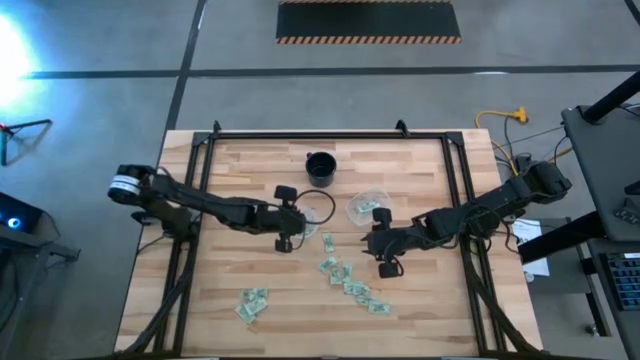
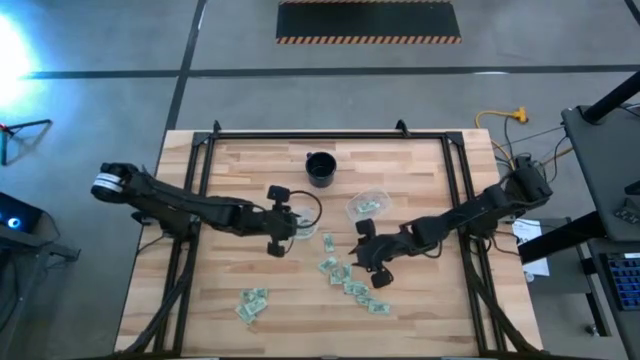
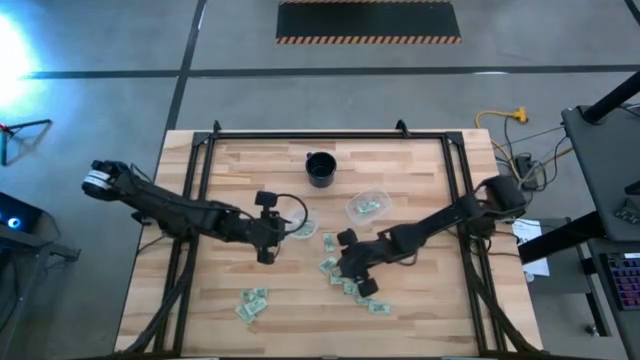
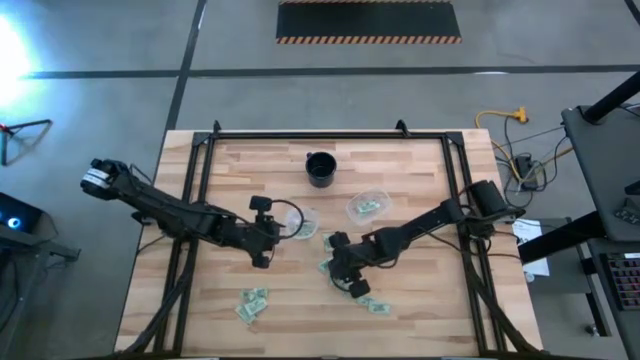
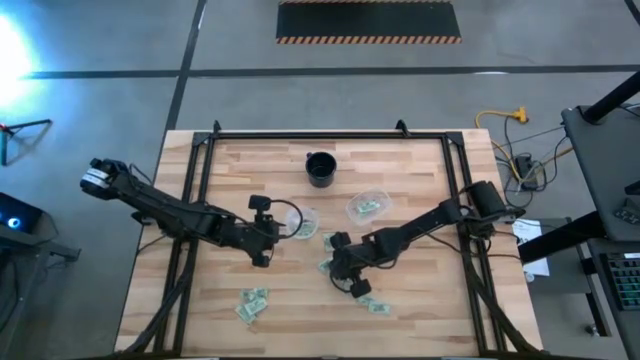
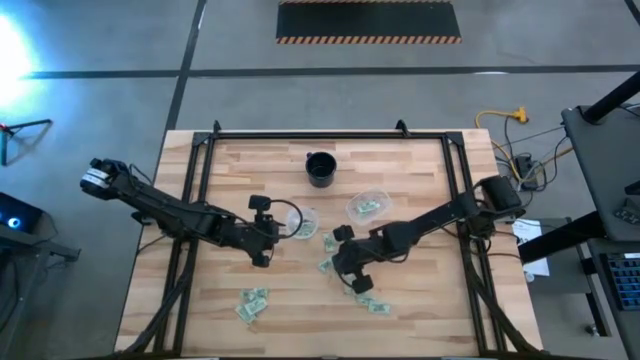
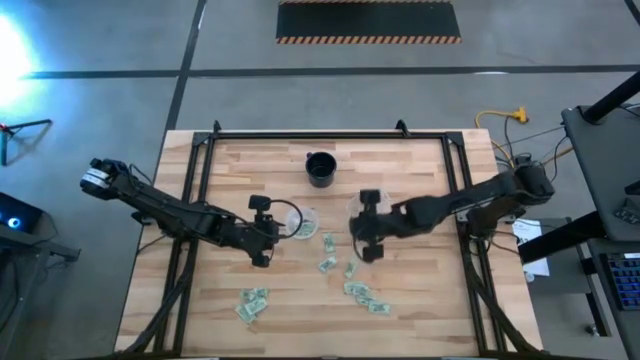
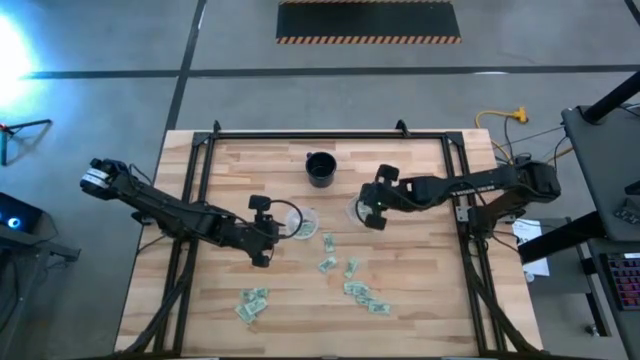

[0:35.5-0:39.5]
Task: Pick and place Stevia / Truvia into bins
Put the green stevia packet into the right transparent container

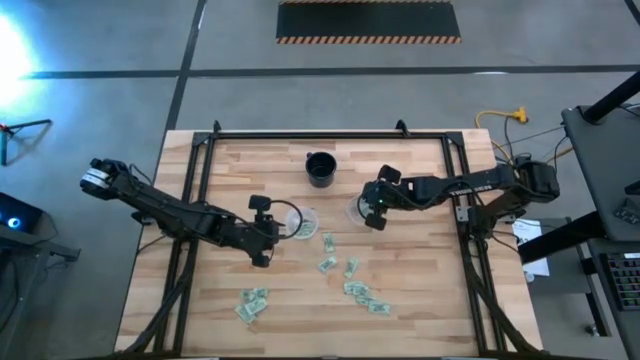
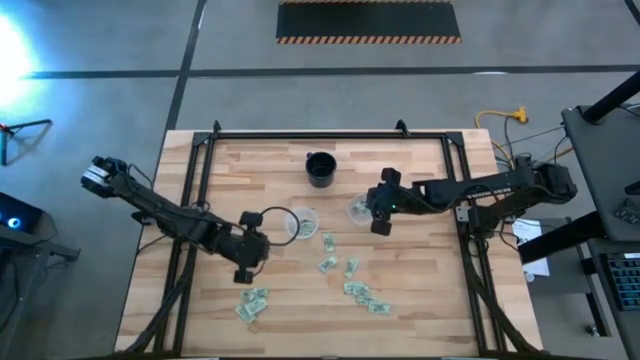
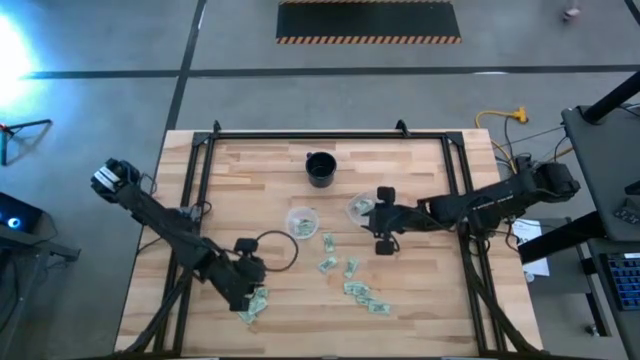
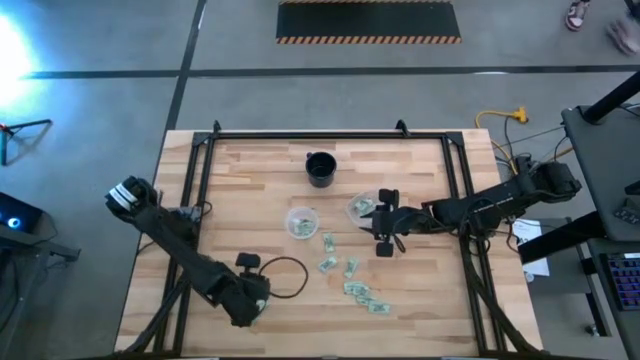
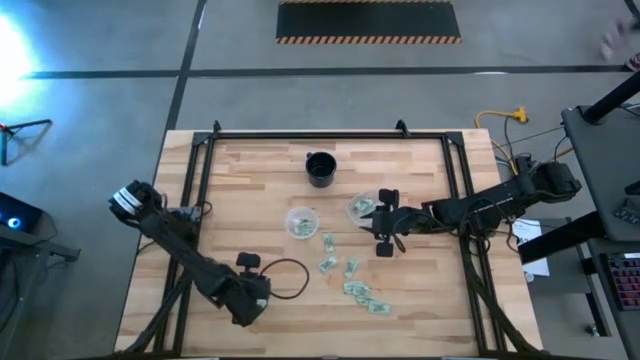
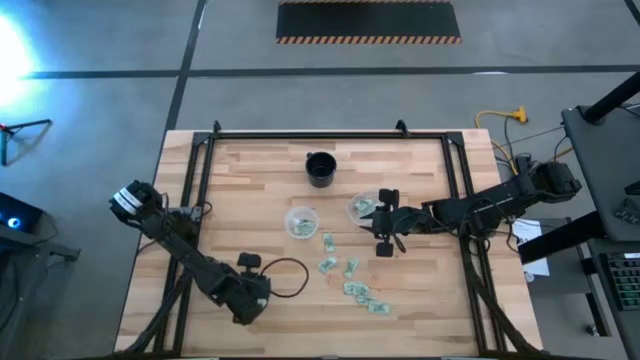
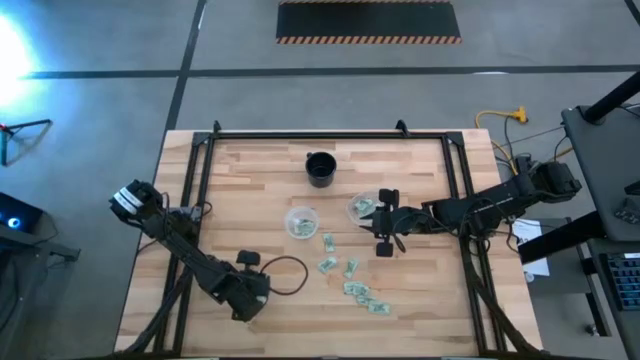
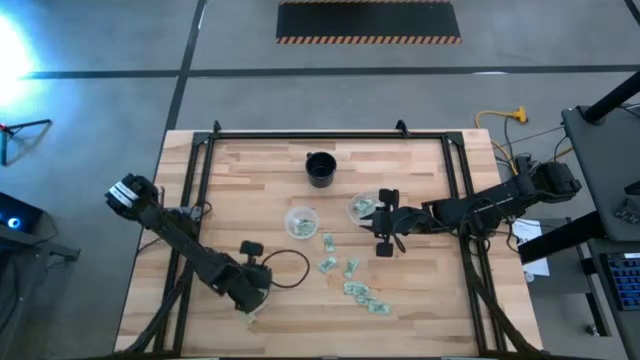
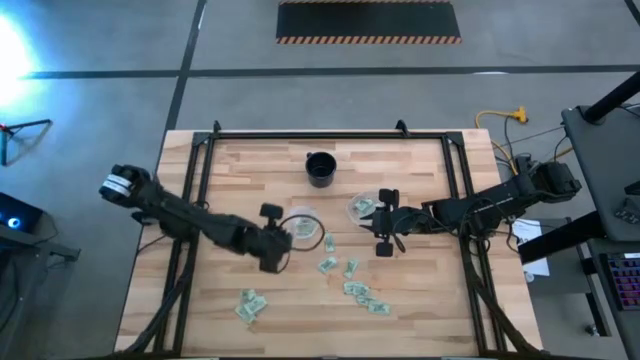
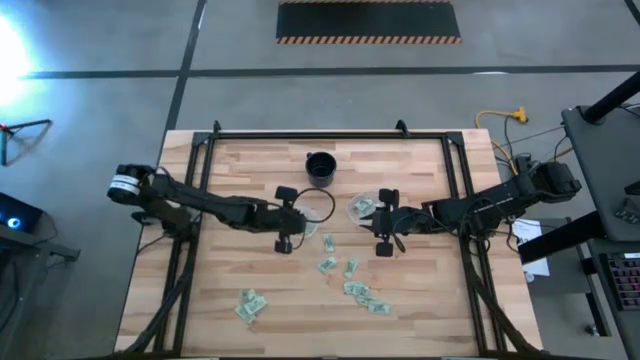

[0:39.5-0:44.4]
Put the green stevia packet into the left transparent container

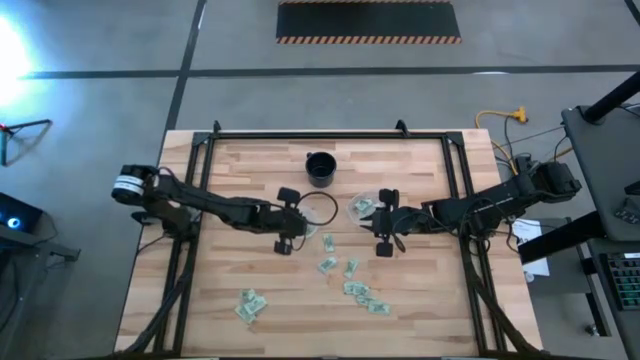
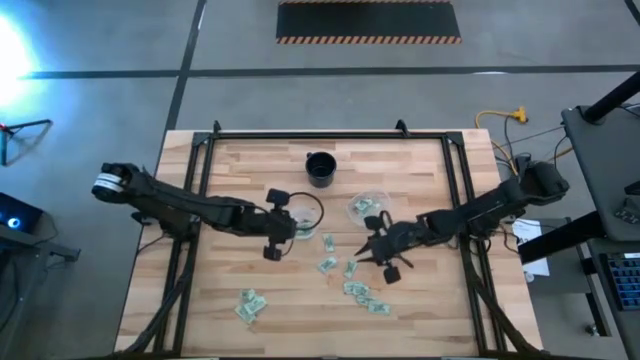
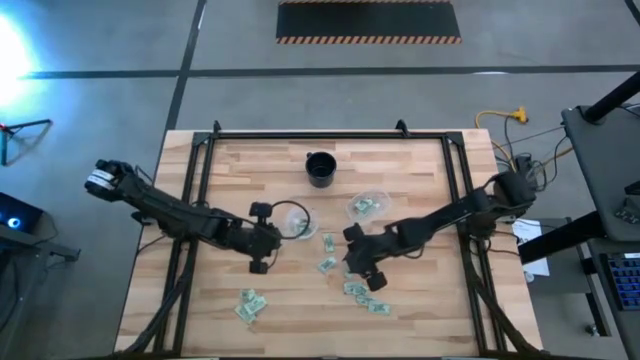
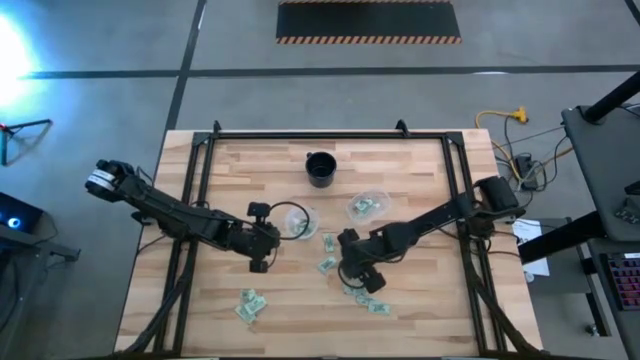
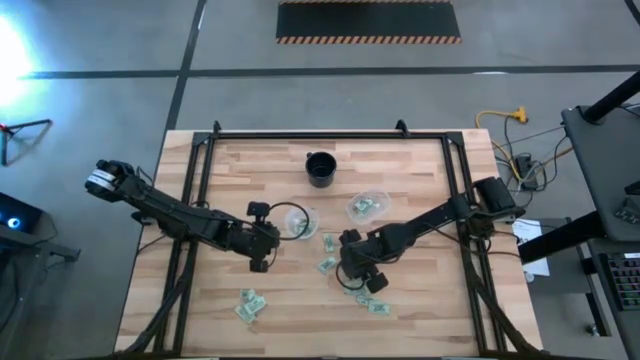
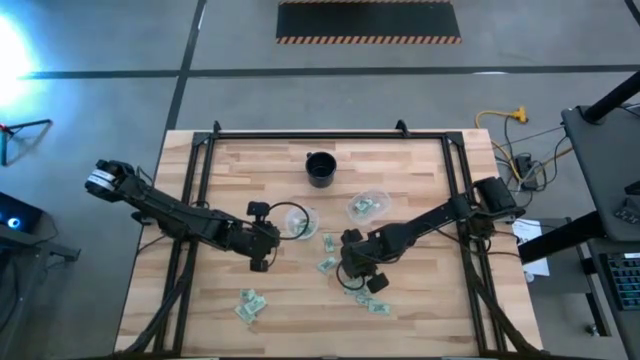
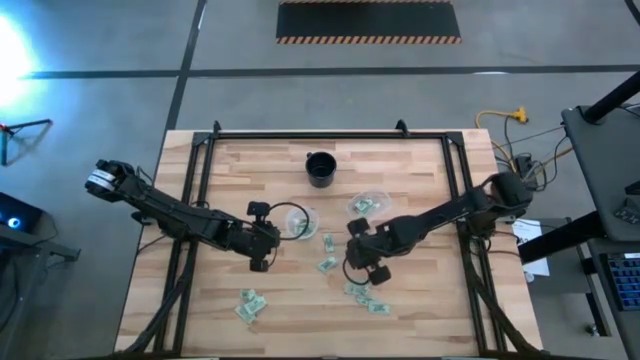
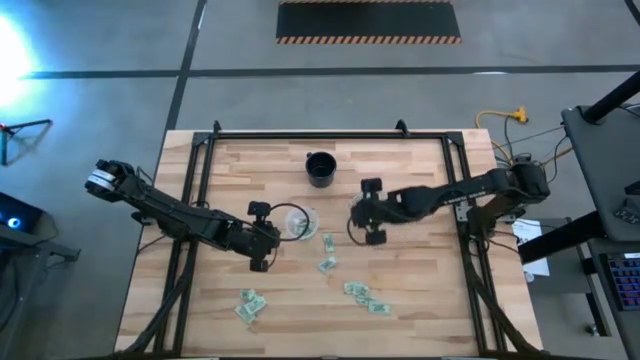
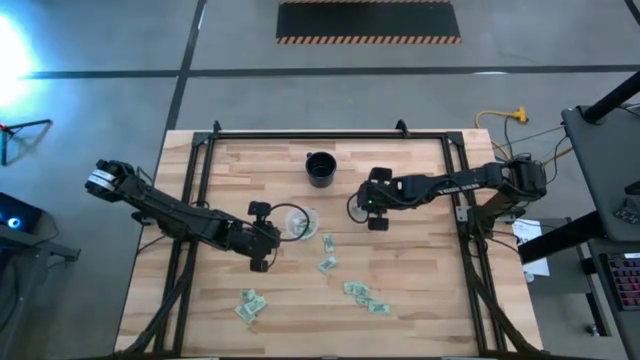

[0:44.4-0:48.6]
Put the green stevia packet into the right transparent container

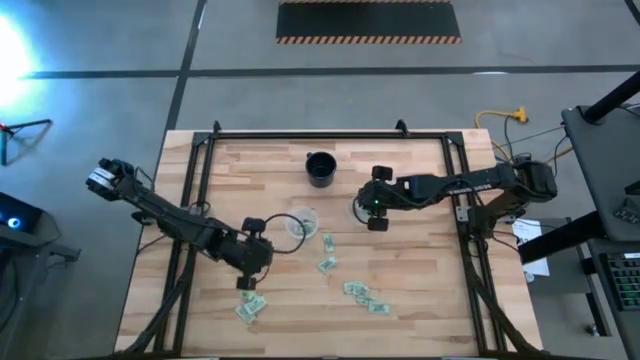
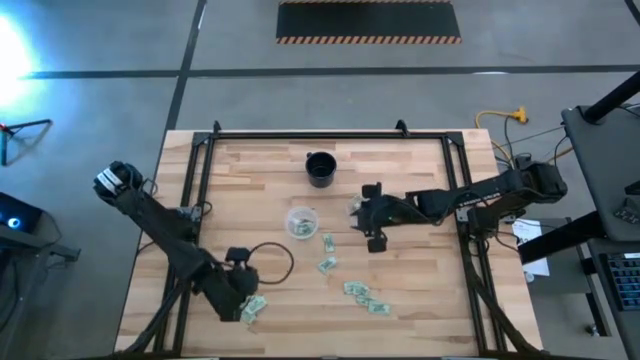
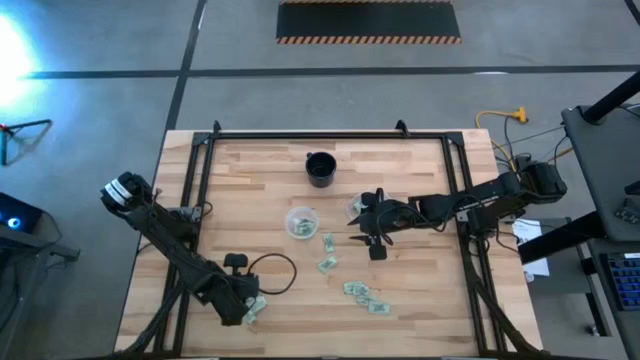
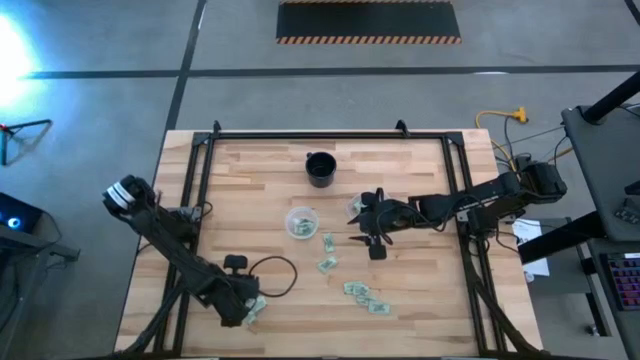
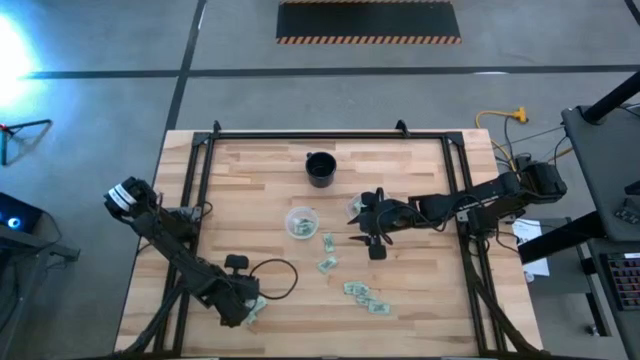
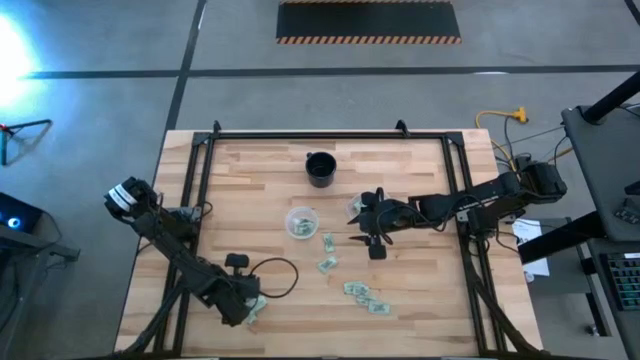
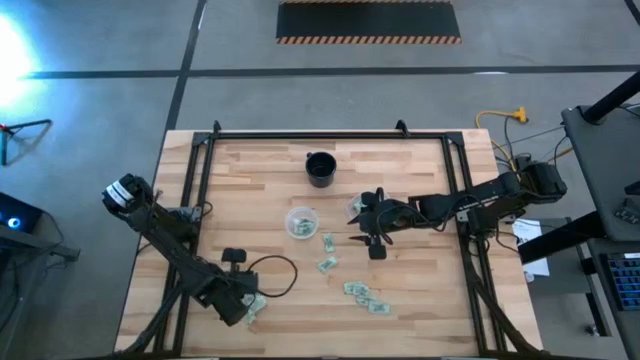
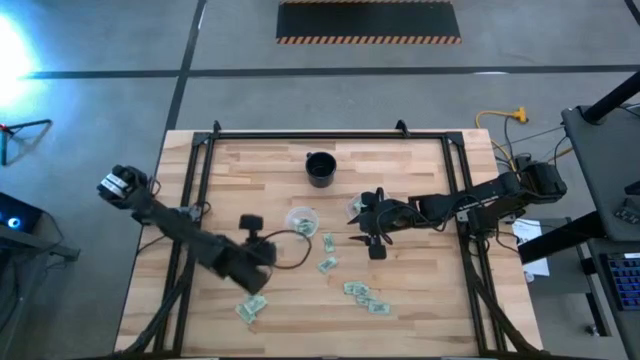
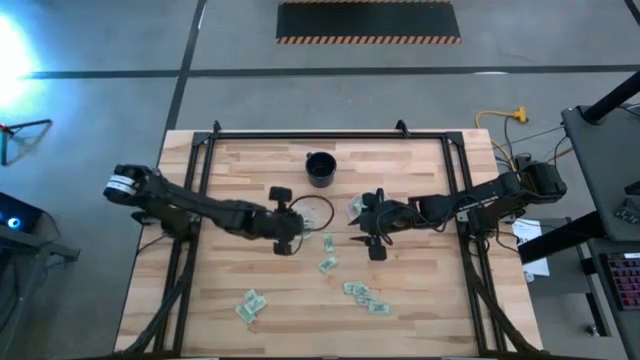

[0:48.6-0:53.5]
Put the green stevia packet into the left transparent container

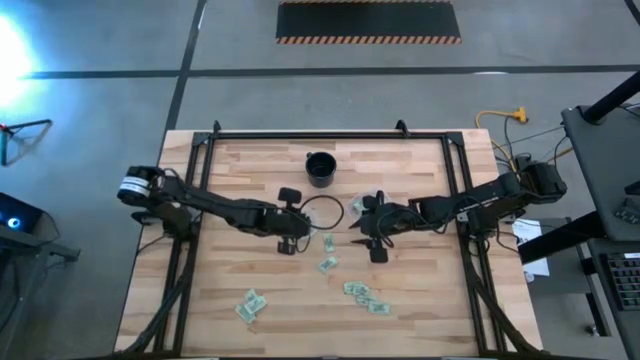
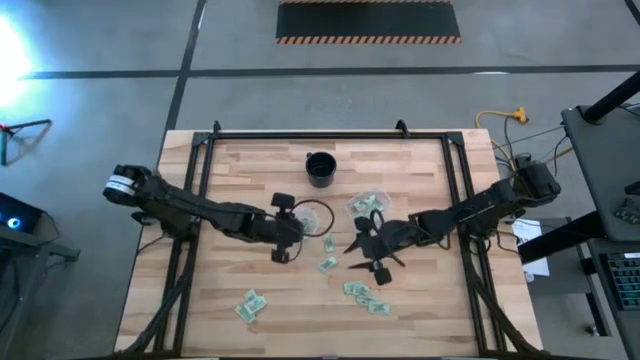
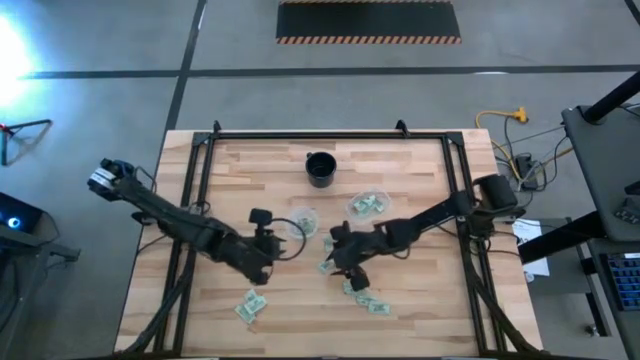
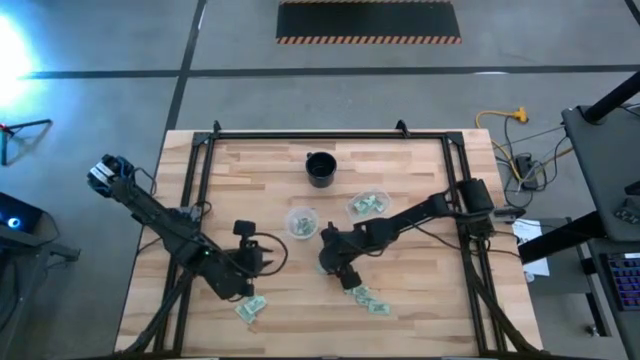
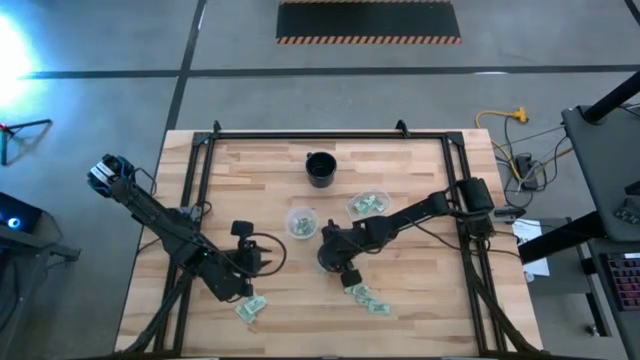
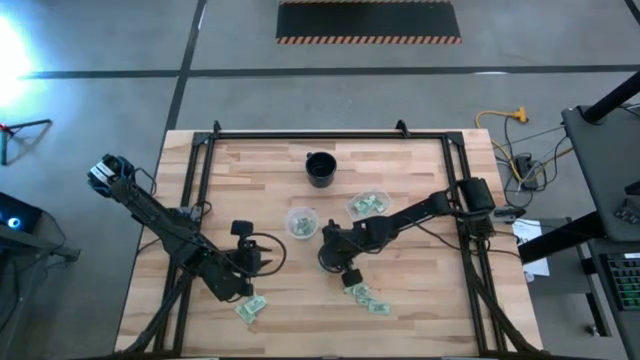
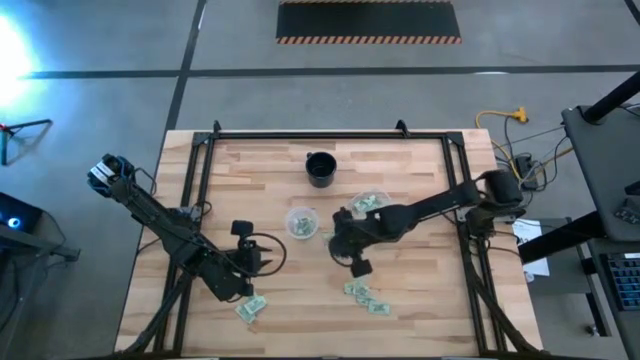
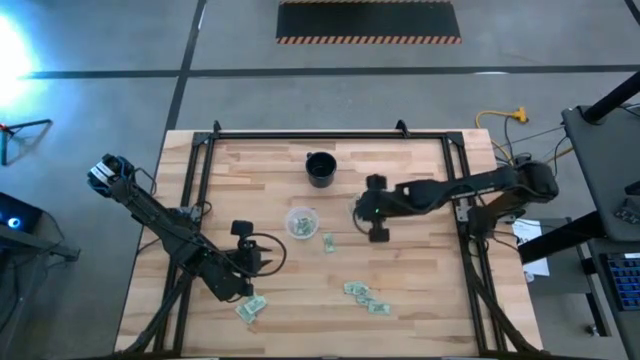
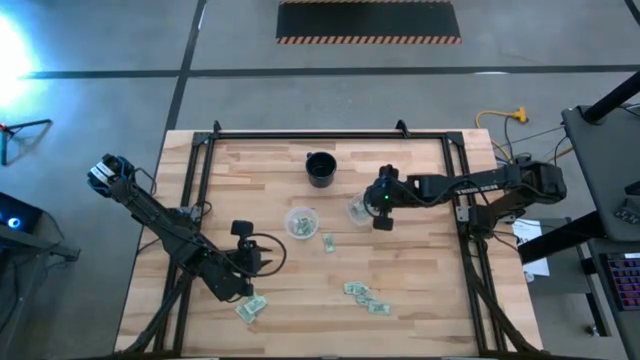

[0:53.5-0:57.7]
Put the green stevia packet into the right transparent container
